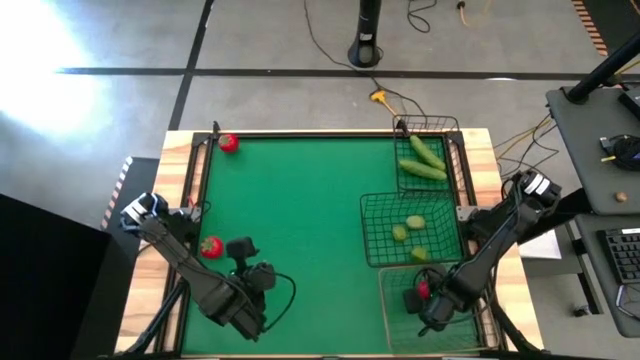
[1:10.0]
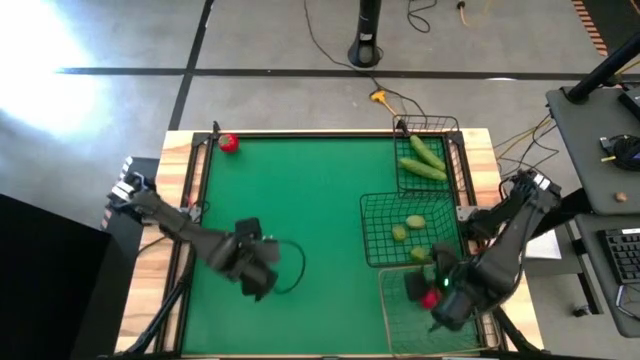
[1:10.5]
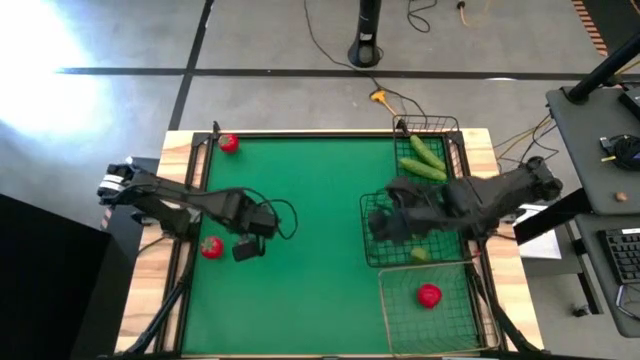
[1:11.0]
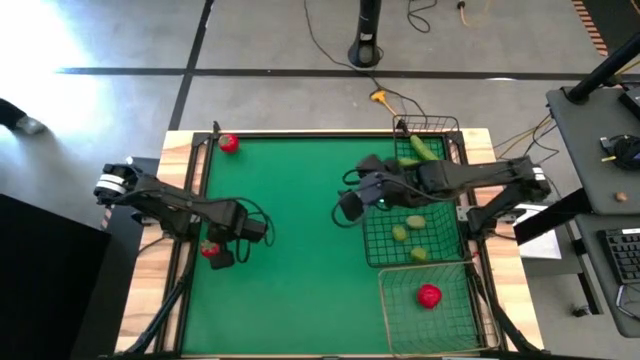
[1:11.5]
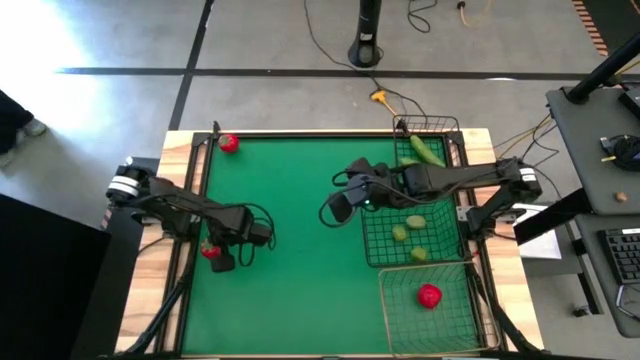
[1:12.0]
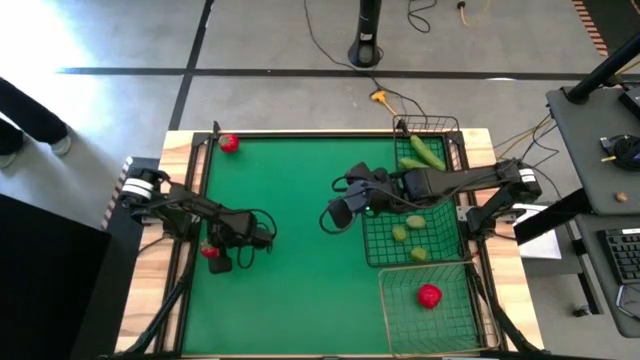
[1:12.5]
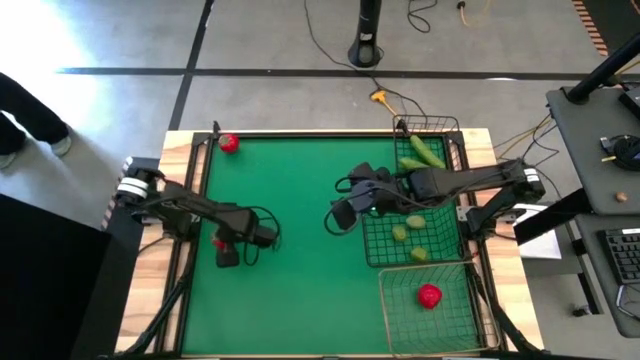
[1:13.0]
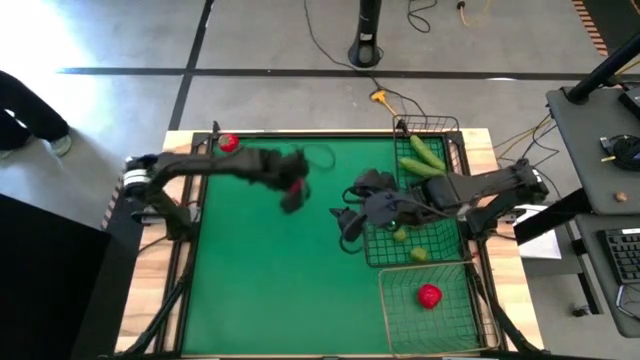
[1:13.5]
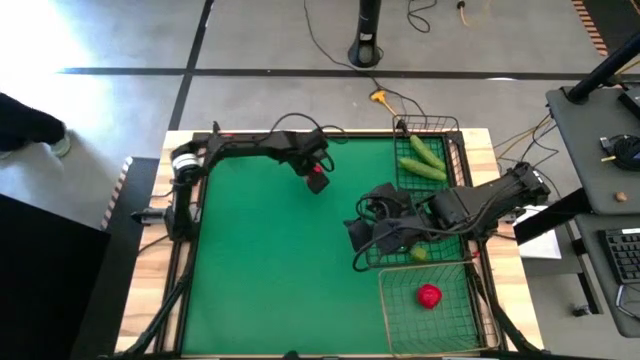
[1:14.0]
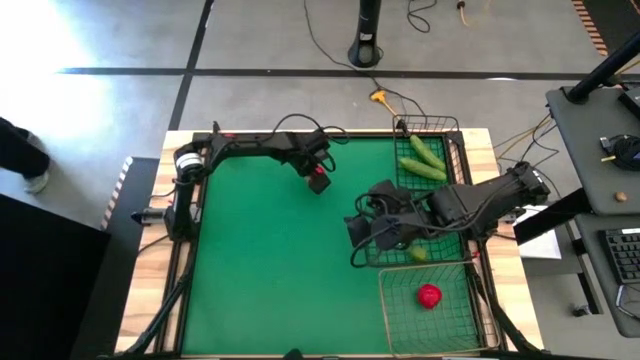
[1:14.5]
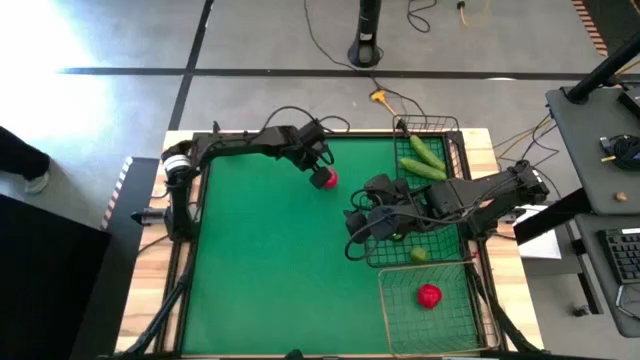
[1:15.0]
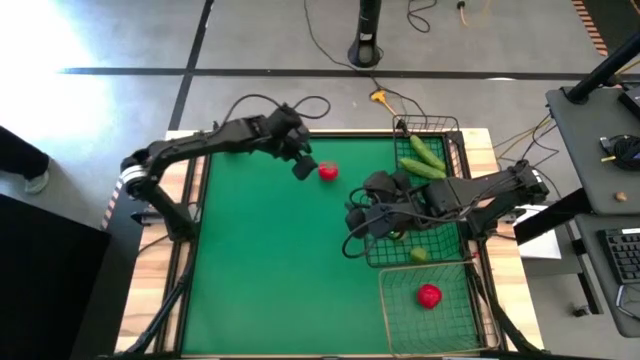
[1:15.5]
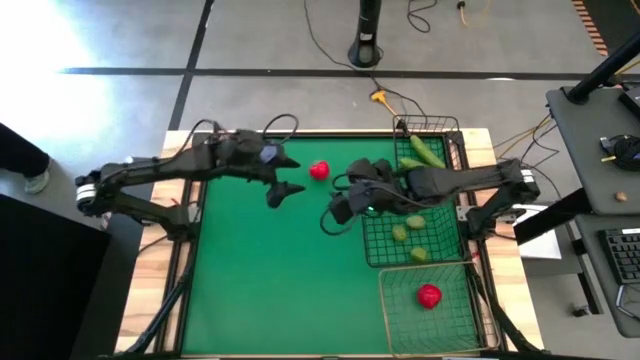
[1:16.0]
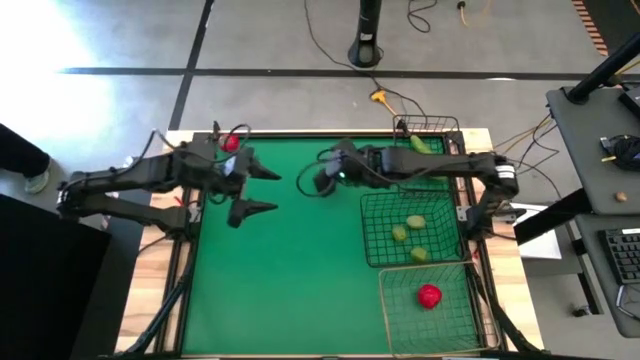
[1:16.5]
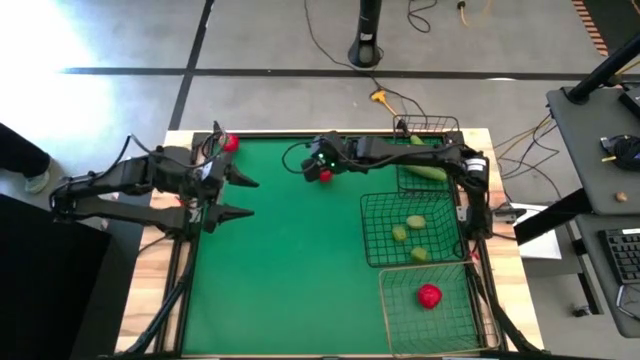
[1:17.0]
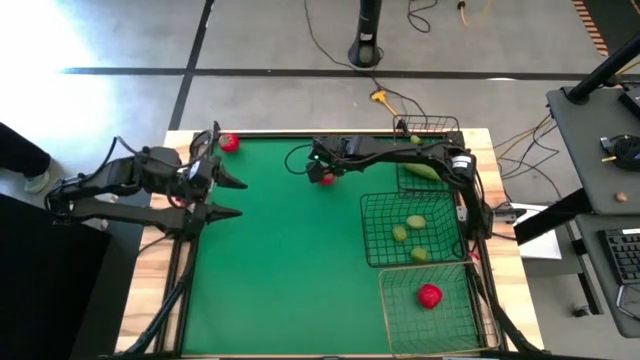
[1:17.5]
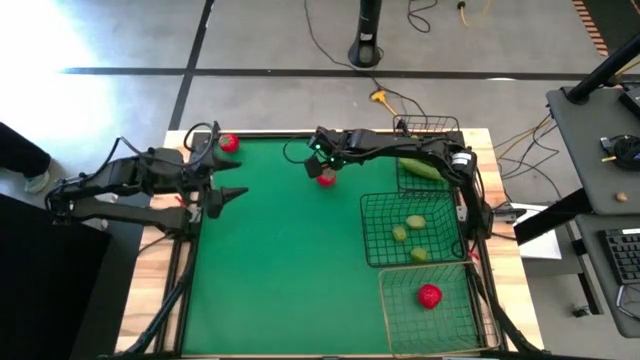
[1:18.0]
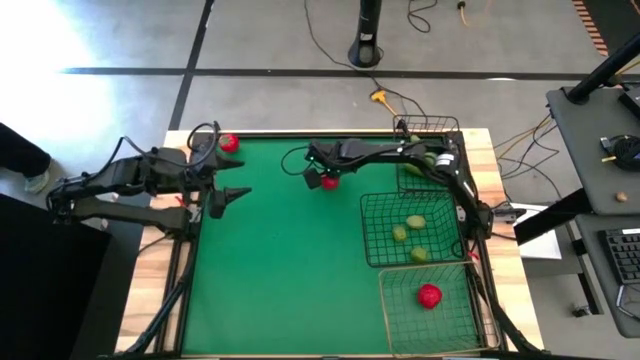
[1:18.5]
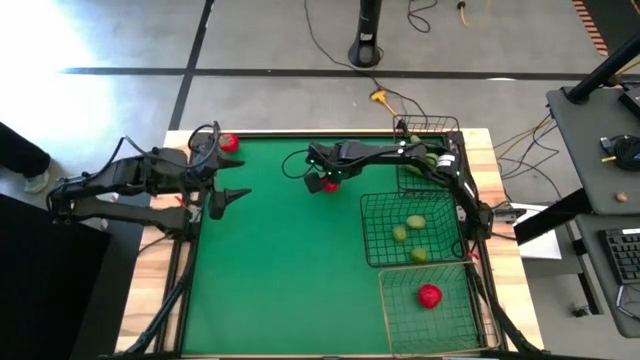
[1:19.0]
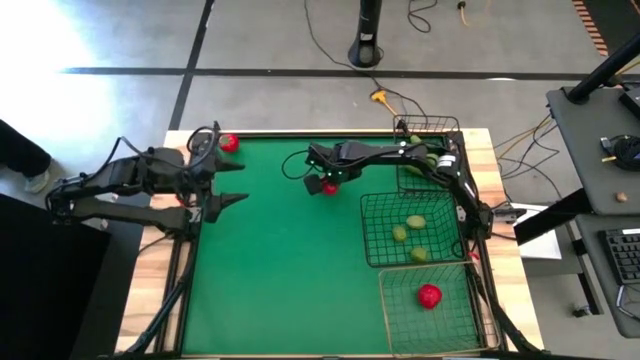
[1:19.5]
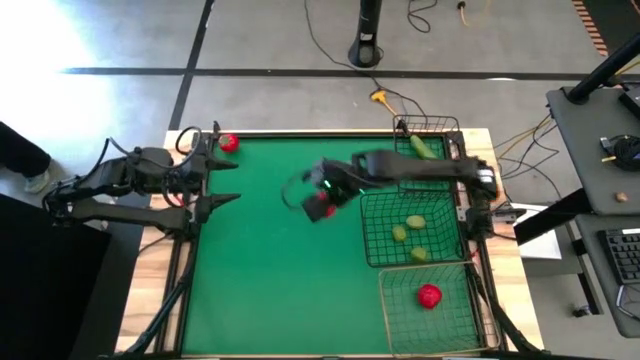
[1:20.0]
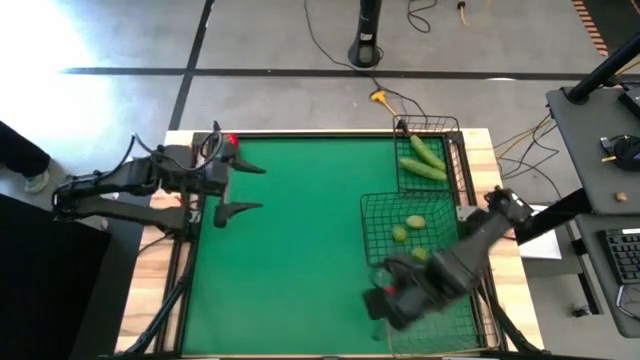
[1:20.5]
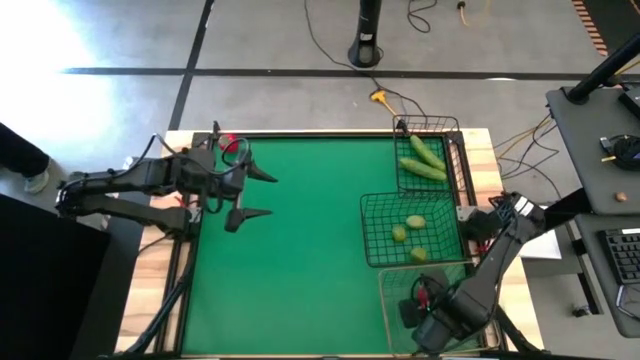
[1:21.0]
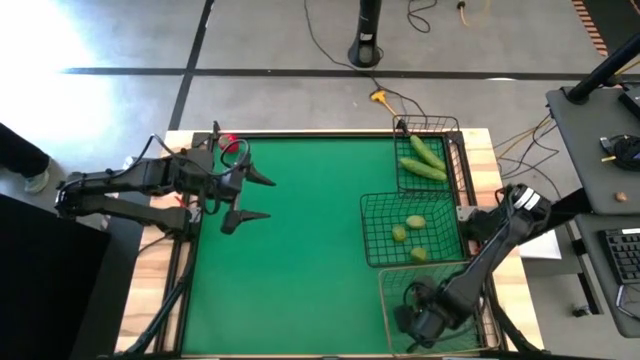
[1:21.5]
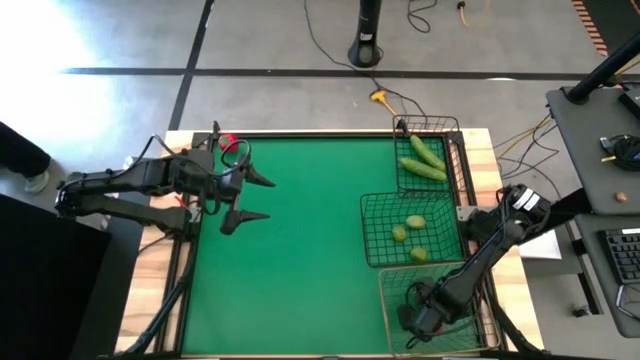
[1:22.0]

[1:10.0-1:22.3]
Task: Sort produce into baskets
Put the bottom tomato into the gold wire basket

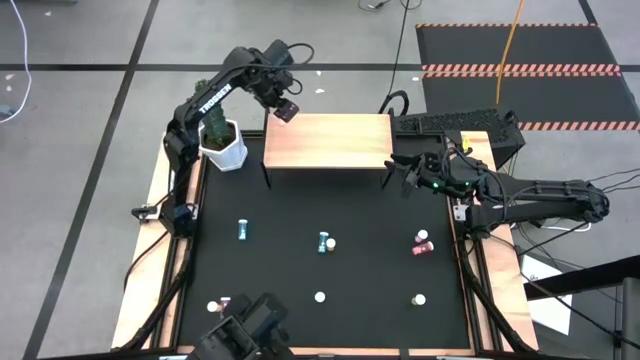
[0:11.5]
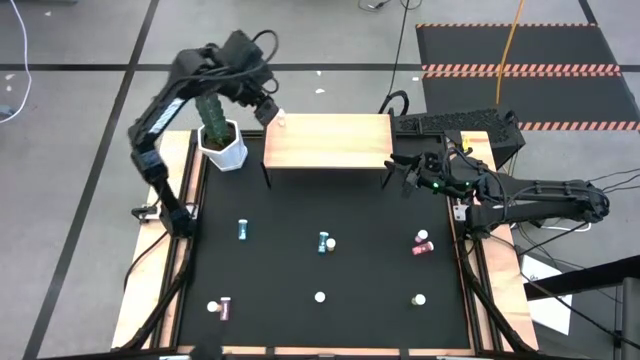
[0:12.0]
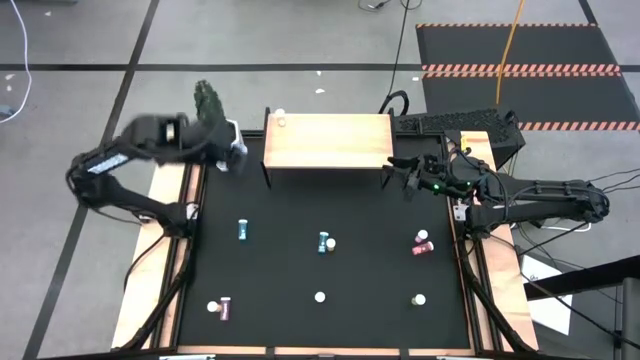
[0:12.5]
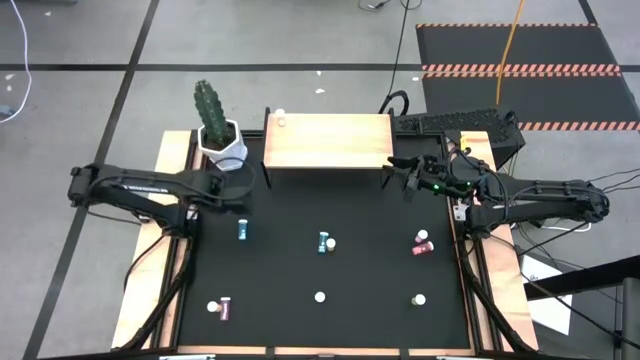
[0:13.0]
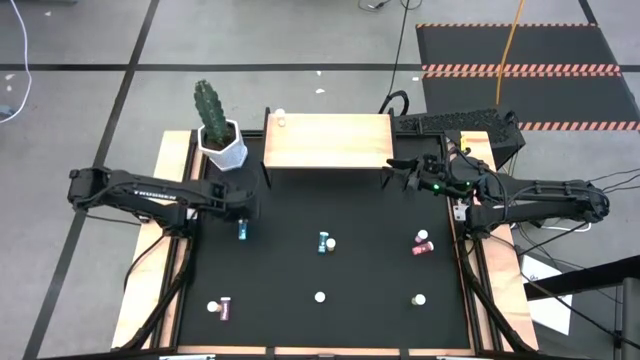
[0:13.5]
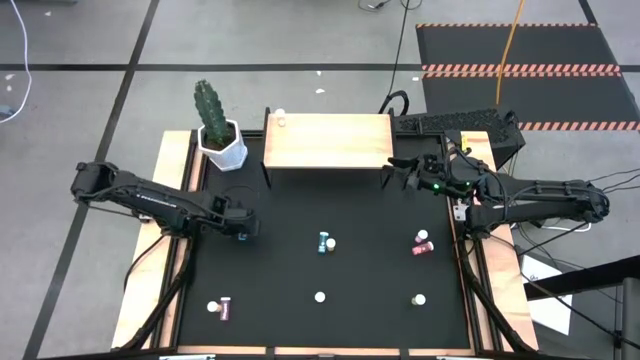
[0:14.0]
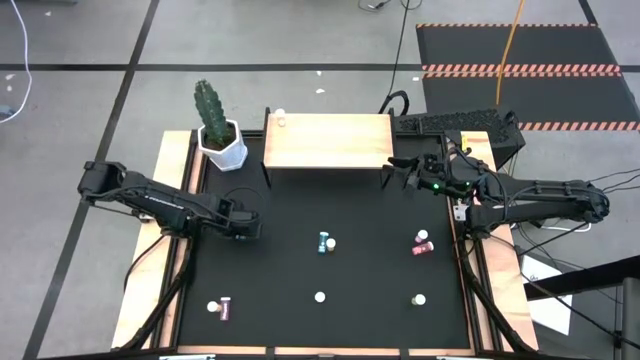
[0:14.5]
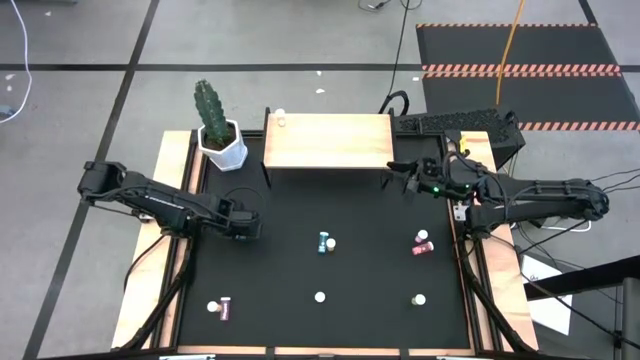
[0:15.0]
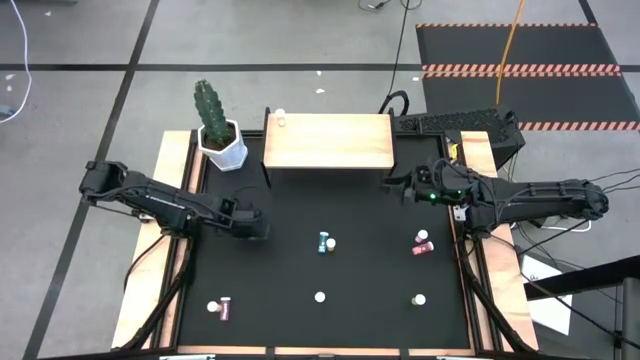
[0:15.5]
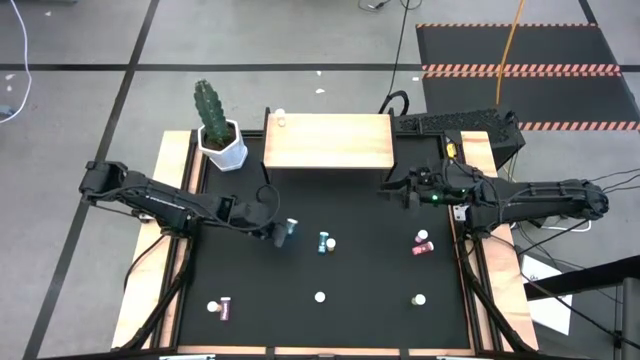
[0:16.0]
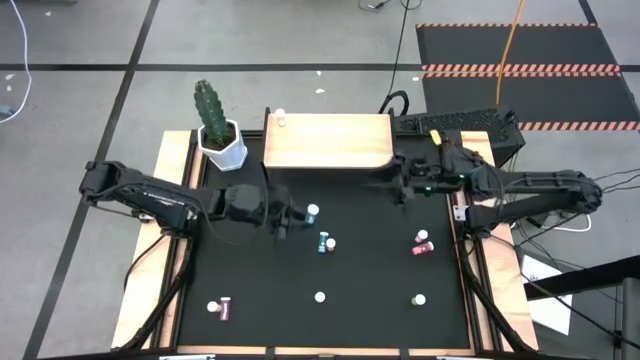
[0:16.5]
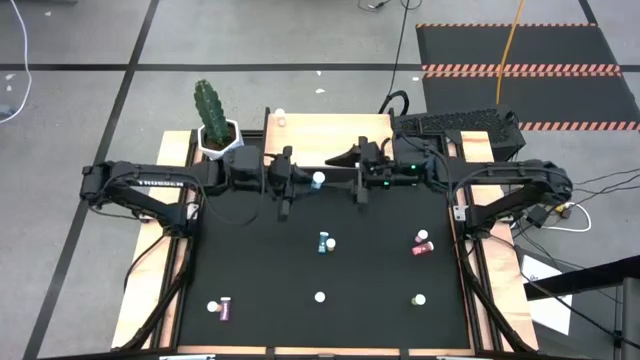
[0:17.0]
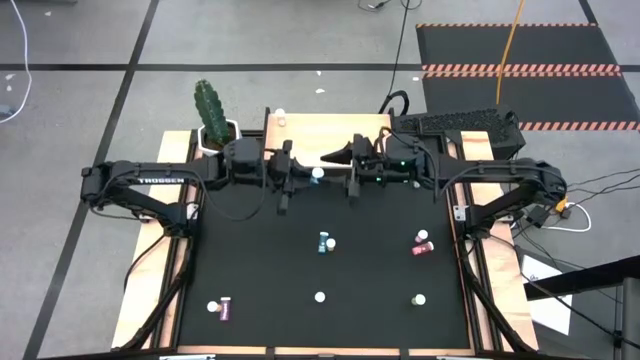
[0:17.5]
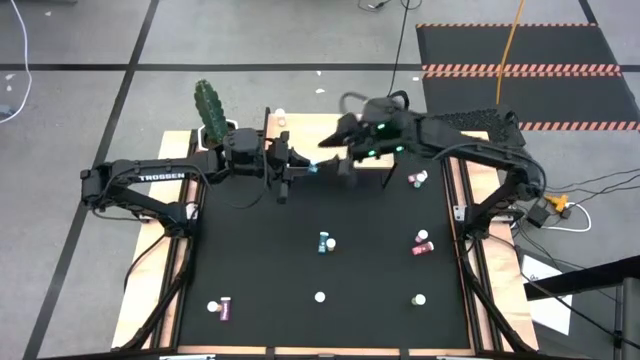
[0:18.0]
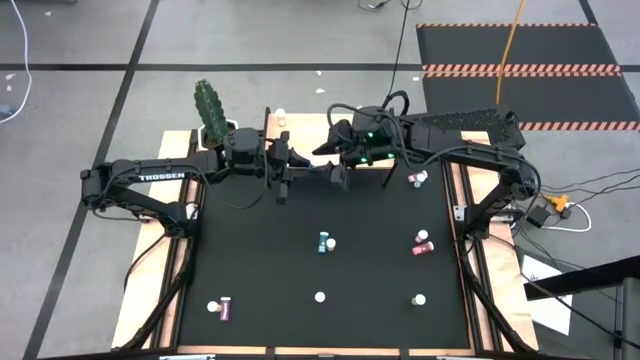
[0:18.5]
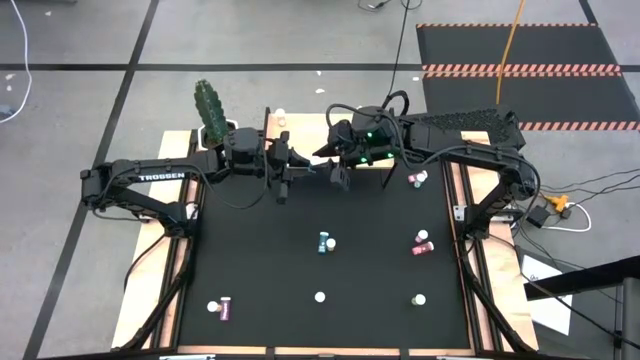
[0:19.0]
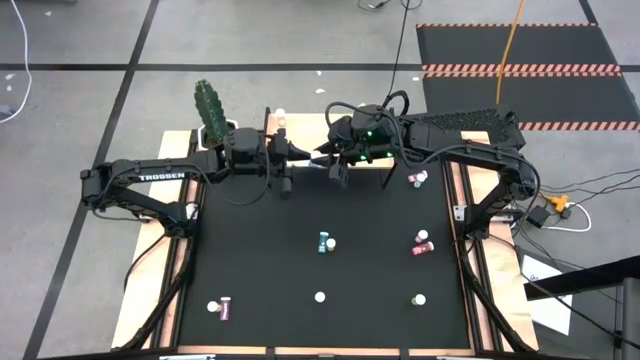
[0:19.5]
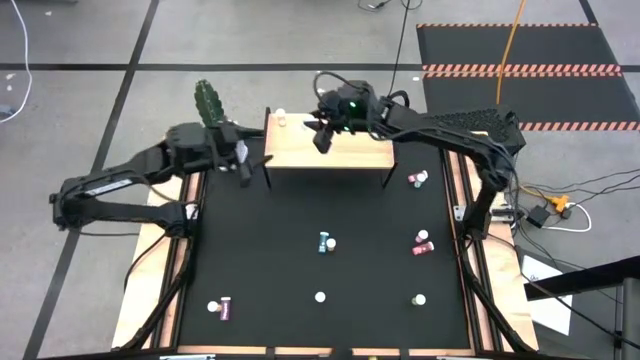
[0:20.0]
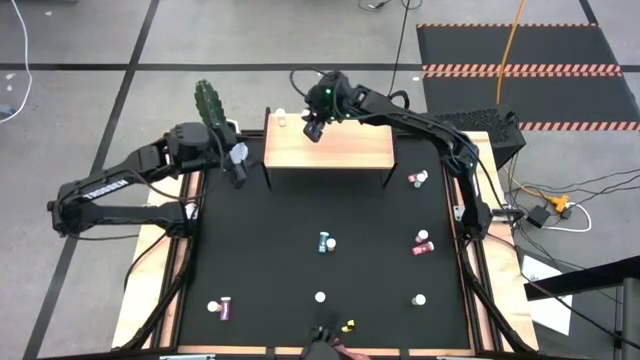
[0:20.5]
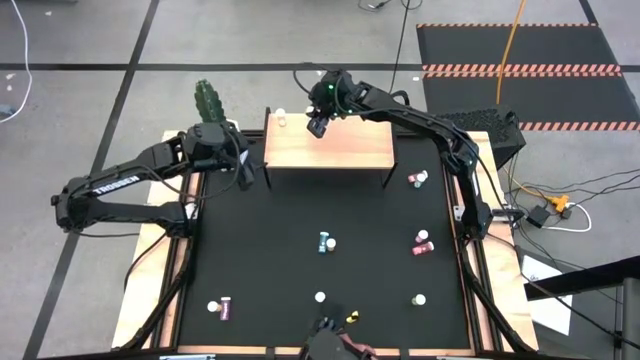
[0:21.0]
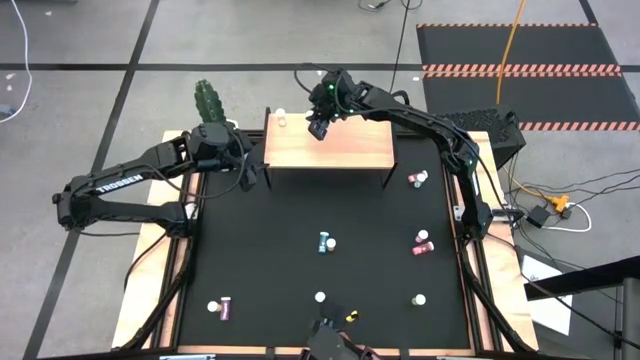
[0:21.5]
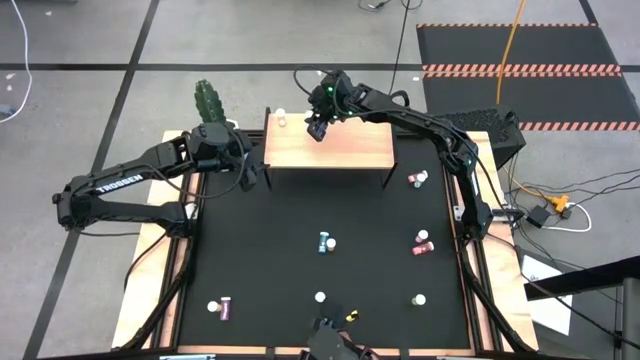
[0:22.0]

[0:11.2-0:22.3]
Task: Pick and place medicine bottles onto shelf by color
Put the left blue pill bottle on the shelf
